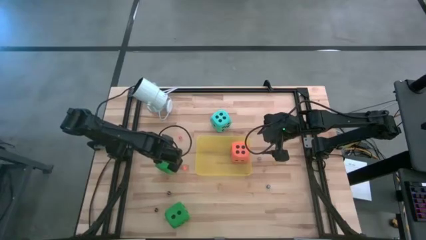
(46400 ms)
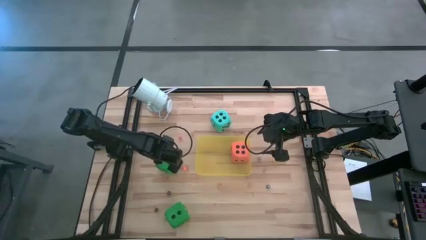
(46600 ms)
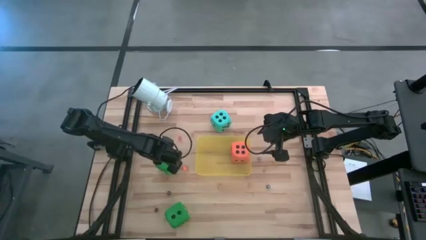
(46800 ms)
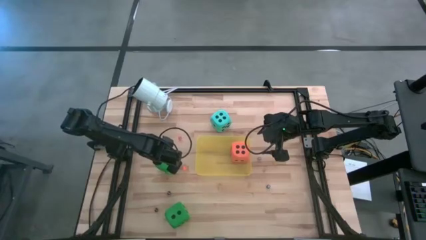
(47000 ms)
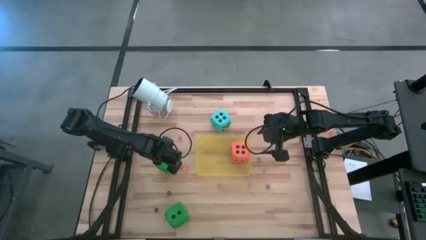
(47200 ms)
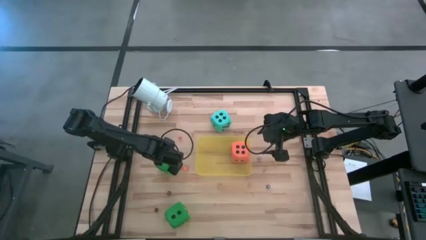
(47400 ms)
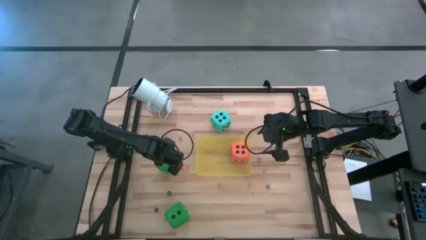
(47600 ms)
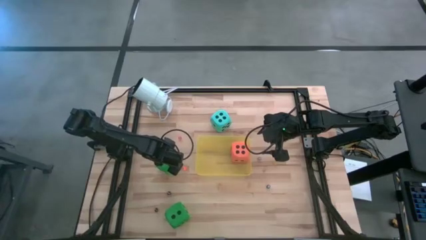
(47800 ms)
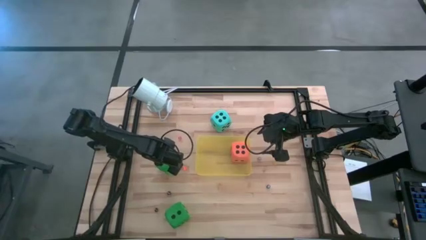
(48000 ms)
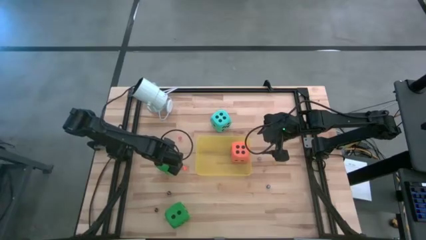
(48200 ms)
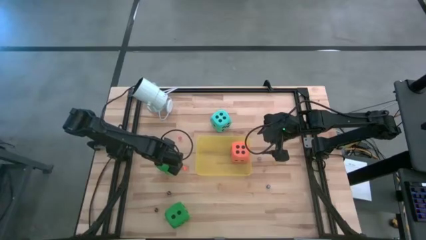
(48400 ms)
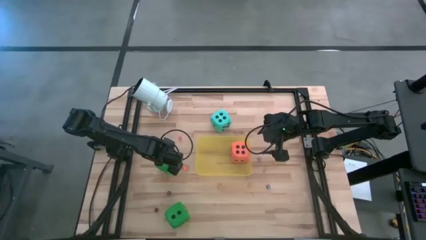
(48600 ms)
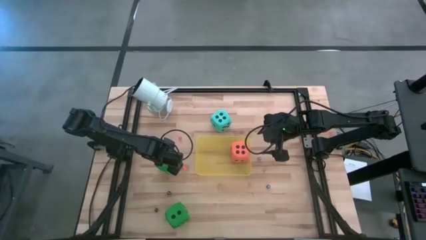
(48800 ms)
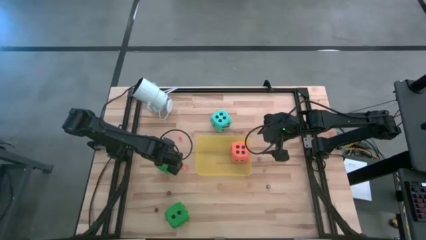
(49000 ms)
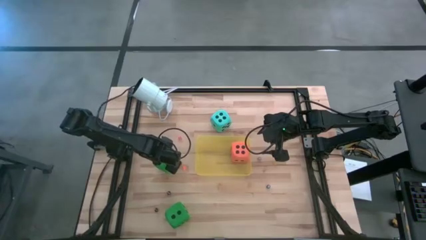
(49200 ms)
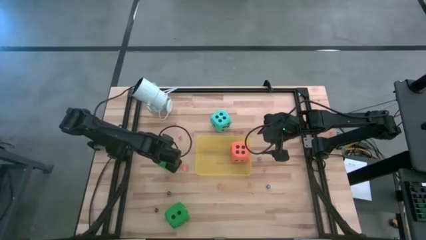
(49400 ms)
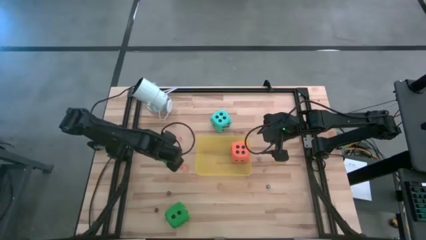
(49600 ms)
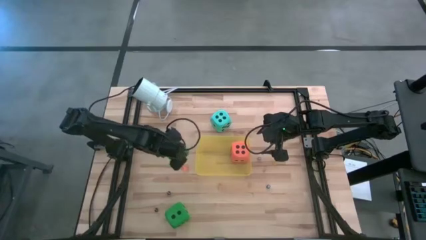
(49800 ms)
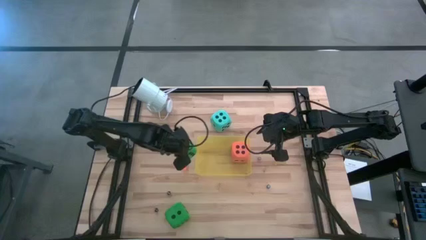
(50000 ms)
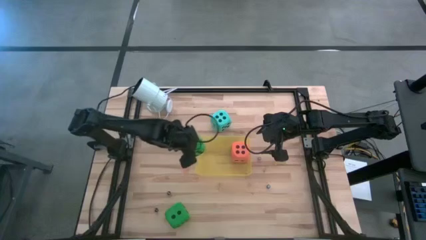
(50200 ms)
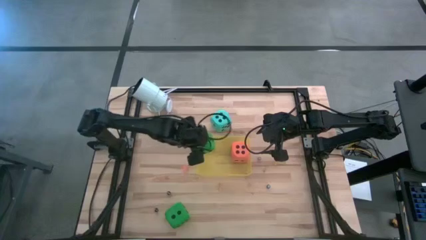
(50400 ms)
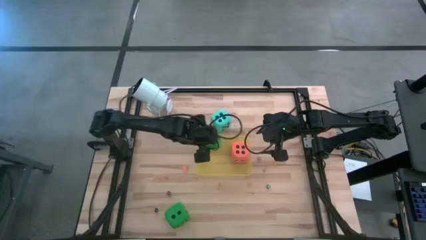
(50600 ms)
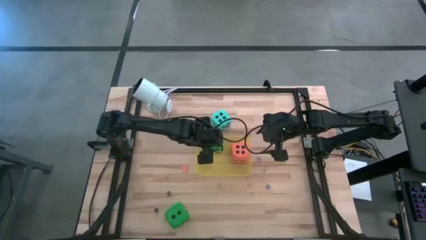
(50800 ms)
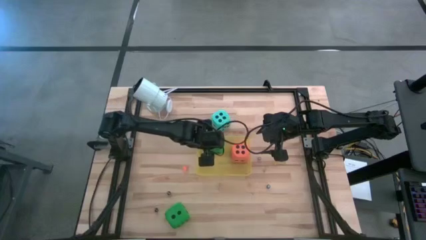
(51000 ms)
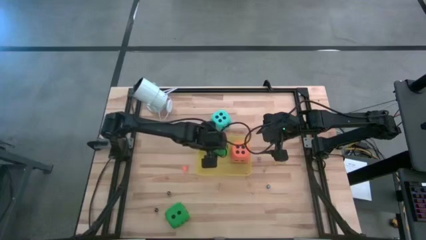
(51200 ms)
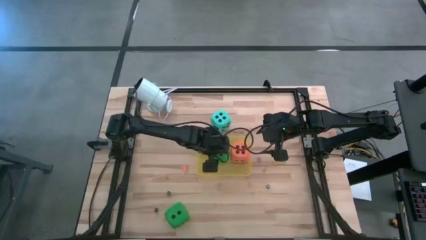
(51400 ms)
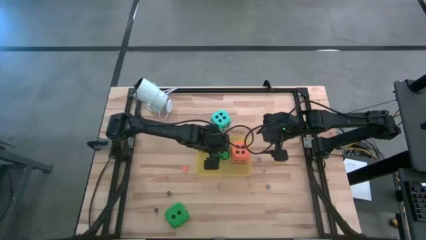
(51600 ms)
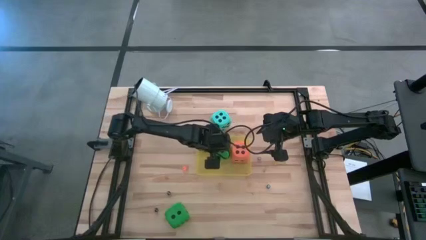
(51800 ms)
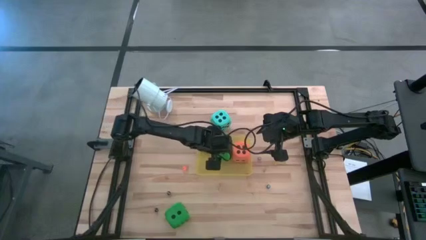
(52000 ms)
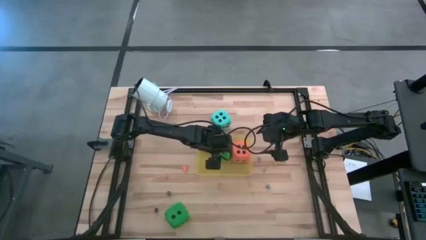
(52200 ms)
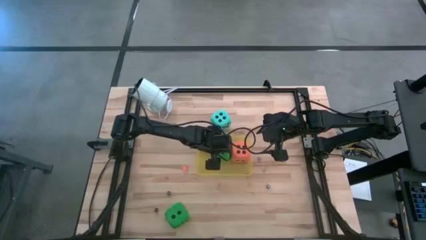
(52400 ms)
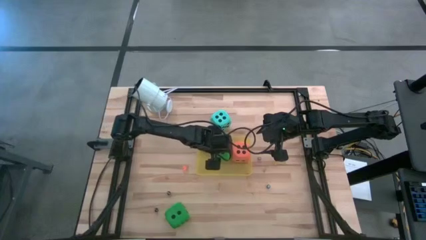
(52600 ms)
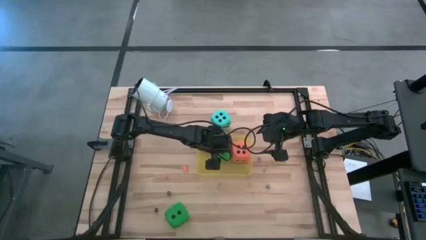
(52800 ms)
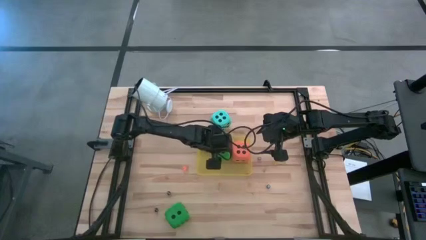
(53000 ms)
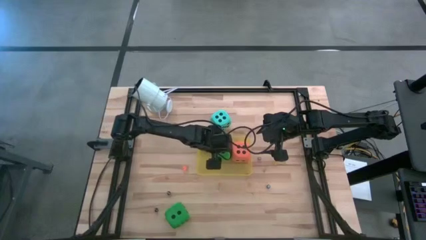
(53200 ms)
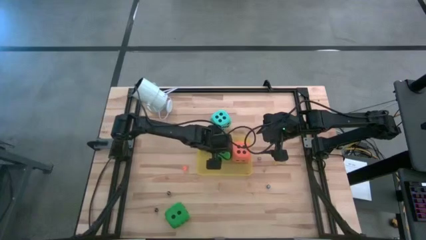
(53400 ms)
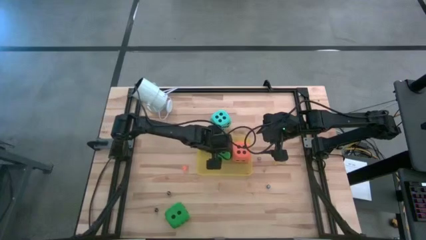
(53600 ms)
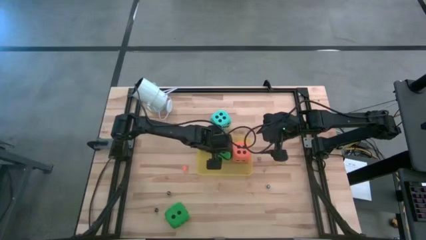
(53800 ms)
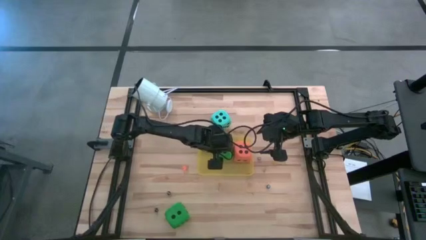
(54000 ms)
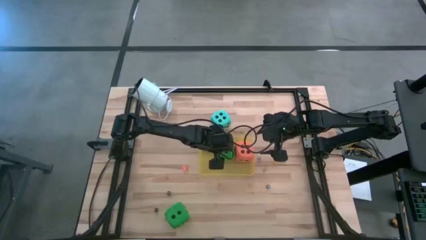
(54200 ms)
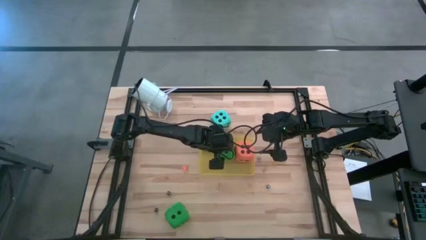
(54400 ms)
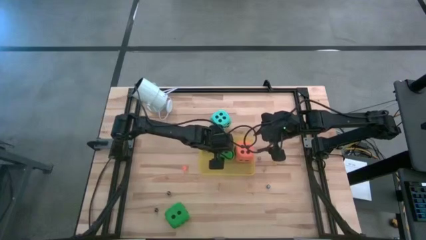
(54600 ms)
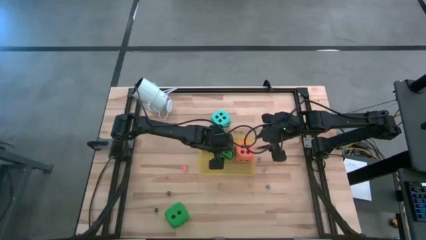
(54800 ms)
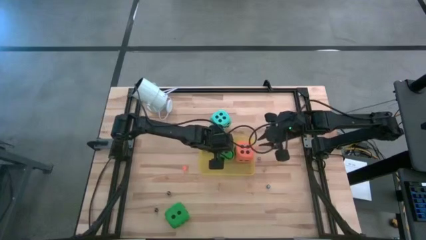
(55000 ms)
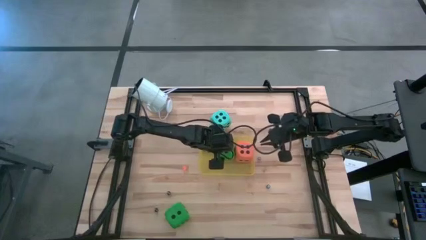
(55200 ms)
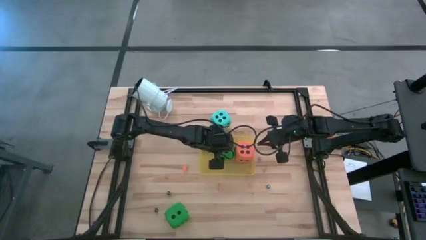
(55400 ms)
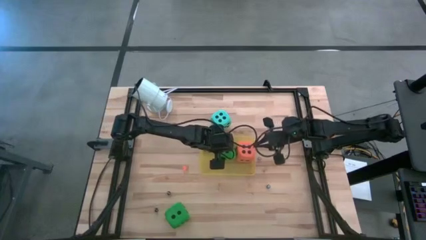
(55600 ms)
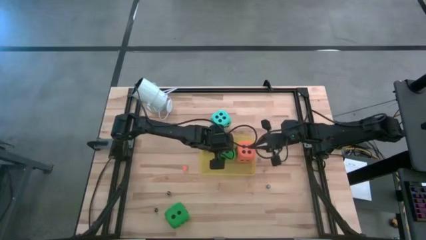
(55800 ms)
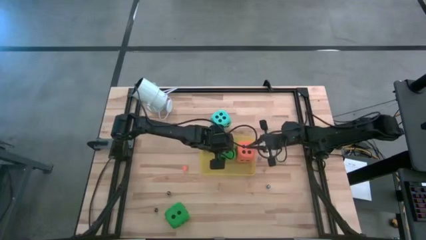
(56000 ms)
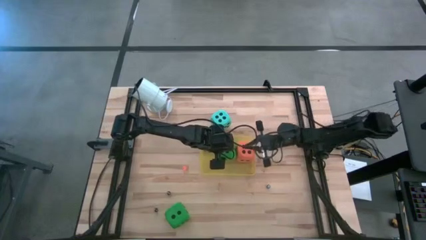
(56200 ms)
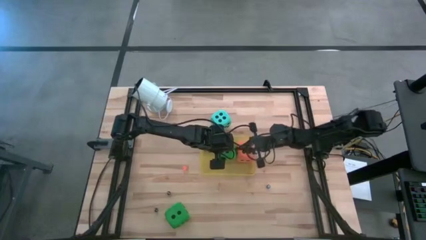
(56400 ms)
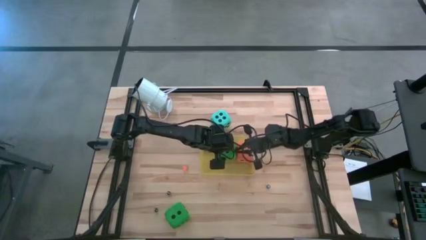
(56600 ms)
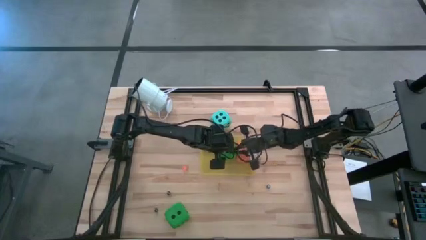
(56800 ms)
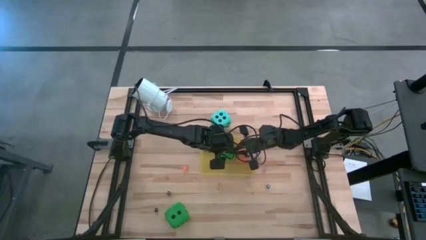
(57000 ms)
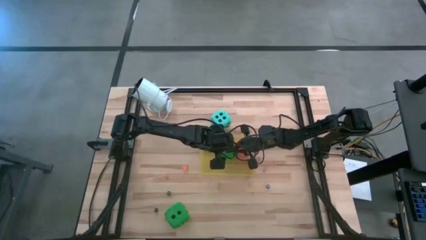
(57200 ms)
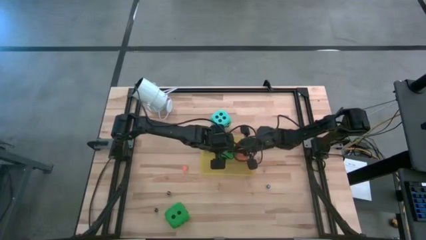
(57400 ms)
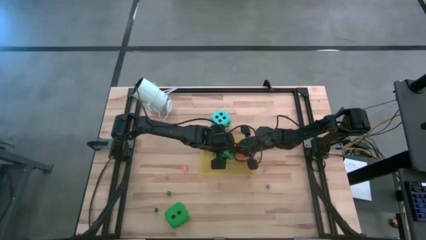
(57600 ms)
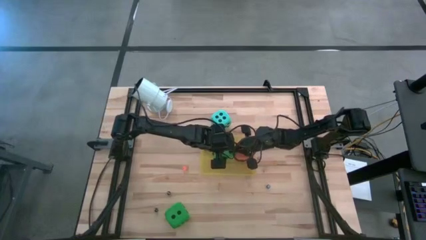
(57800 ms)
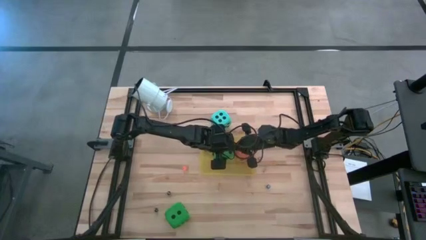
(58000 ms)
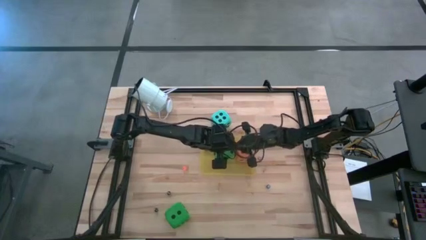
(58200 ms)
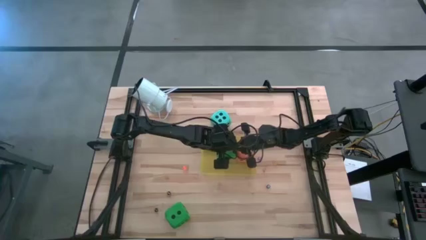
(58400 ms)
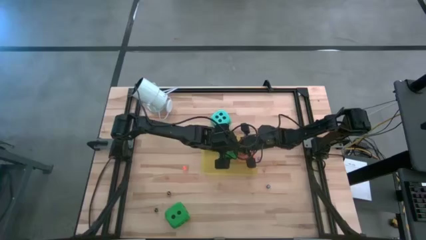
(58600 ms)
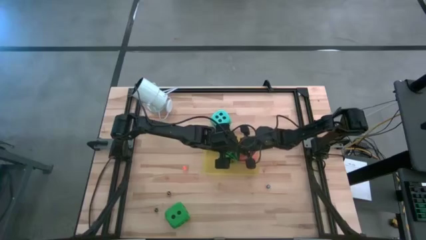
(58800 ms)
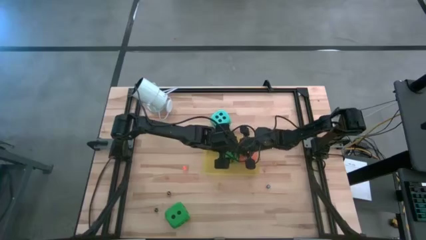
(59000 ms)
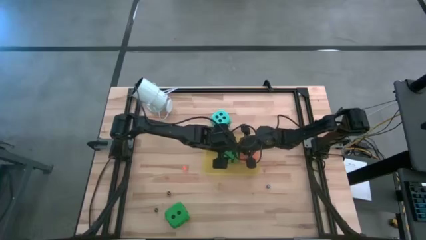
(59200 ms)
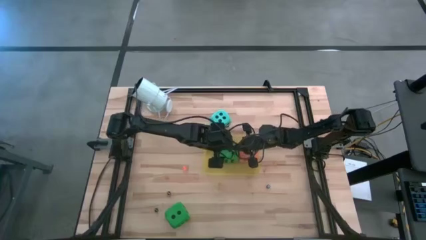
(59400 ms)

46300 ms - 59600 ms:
Task: Pick & Place Dice
Put the top big green dice into the yellow bin

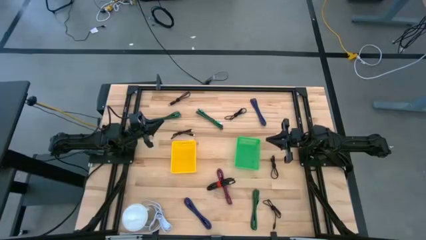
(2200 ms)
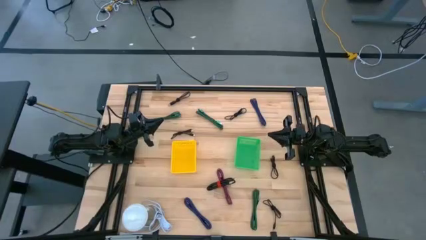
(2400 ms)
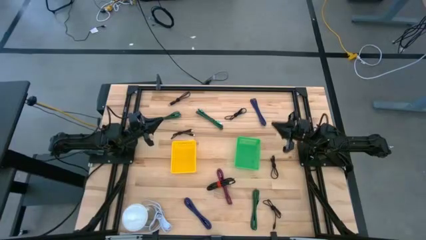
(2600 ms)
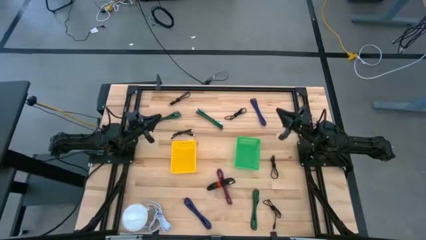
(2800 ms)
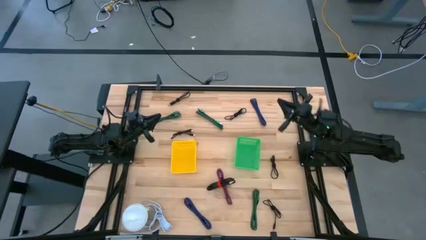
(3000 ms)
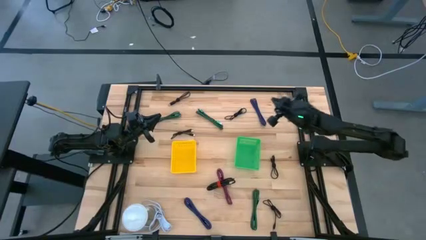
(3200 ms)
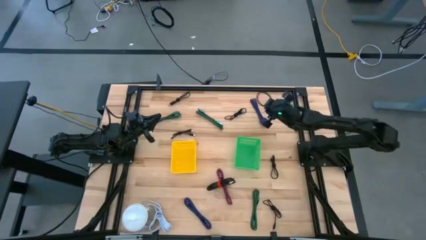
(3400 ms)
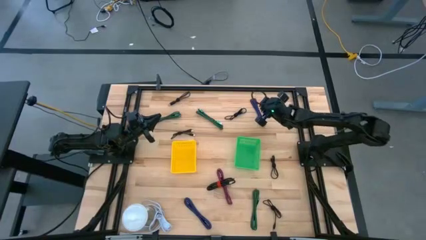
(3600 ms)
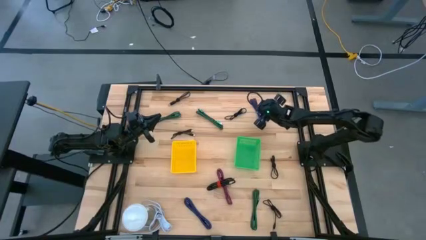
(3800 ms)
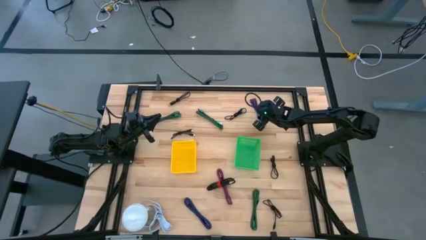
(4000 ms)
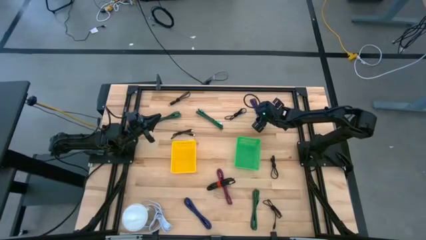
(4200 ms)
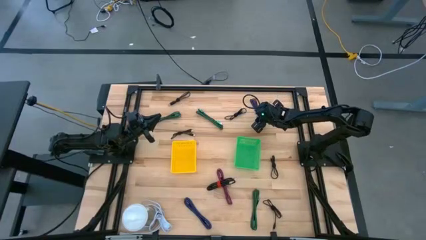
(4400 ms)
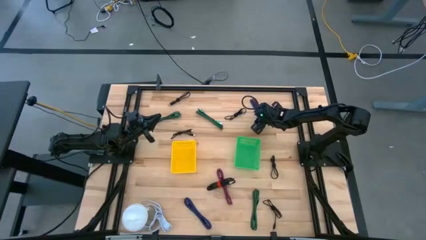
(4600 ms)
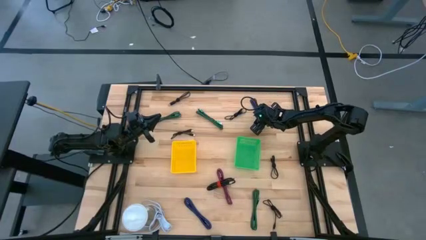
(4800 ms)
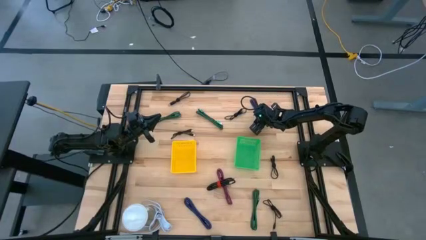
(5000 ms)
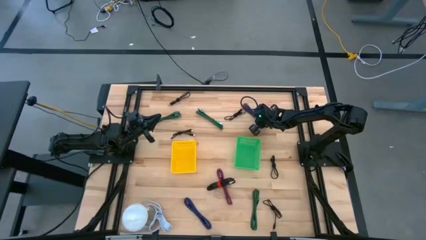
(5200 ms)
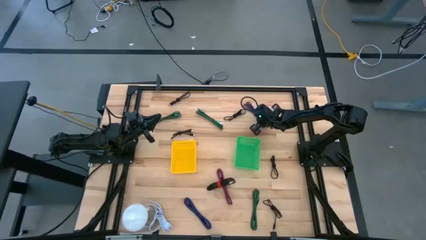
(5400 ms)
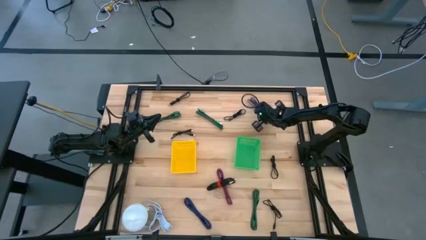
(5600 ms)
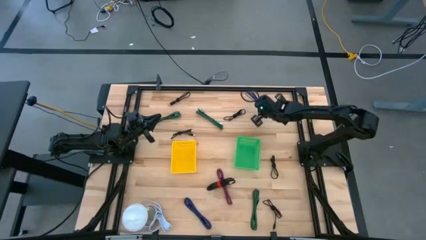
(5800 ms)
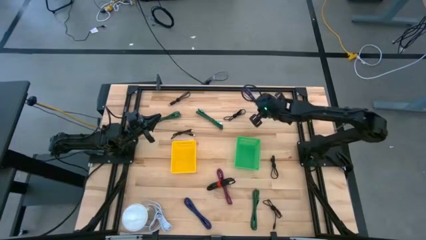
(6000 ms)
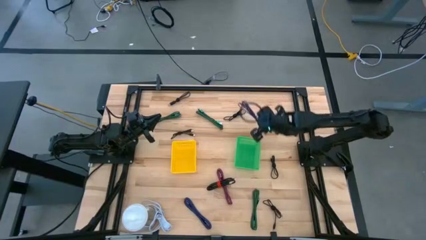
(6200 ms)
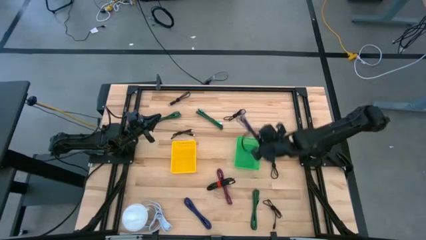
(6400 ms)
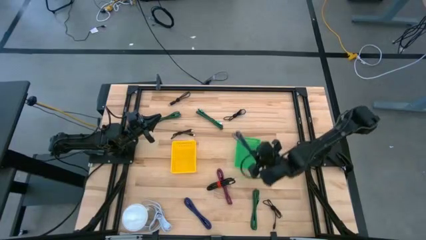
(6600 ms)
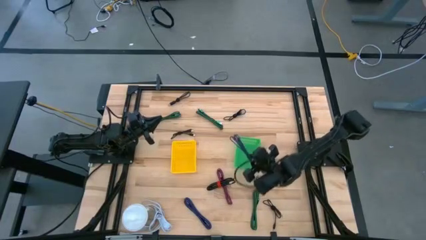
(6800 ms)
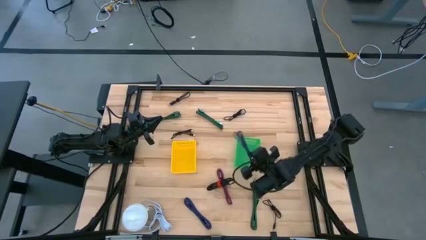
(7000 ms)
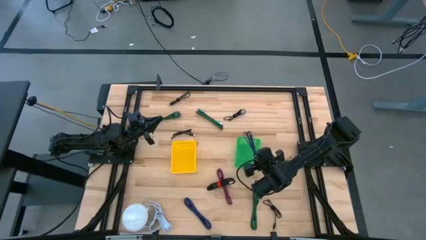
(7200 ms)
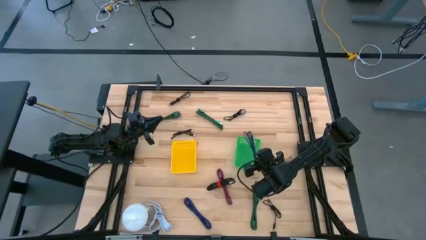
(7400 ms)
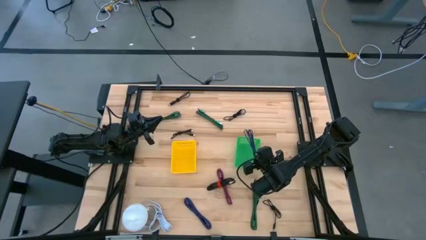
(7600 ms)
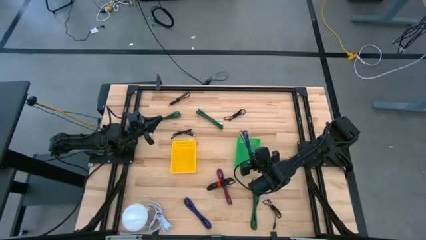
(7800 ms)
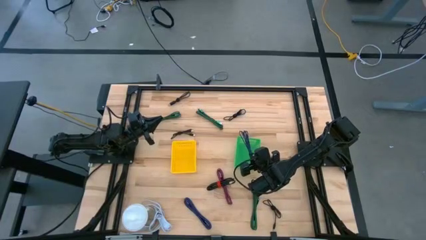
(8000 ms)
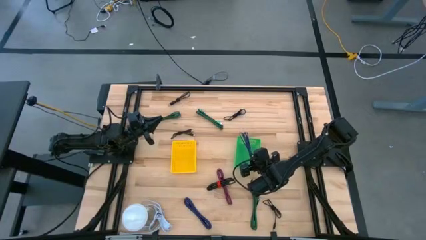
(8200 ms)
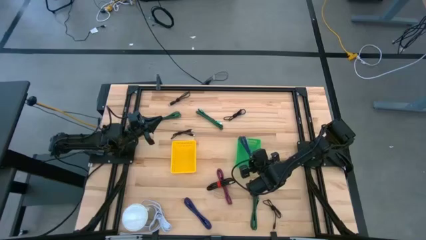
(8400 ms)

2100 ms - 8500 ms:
Task: Pick & Place USB Port
Put the black blue charger cable into the green bin
